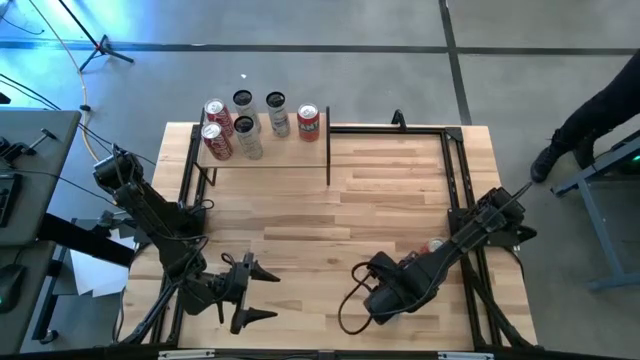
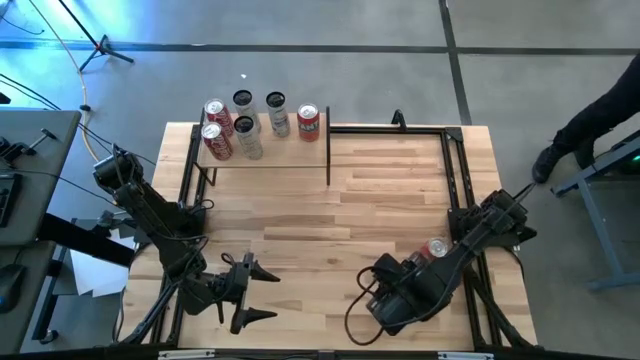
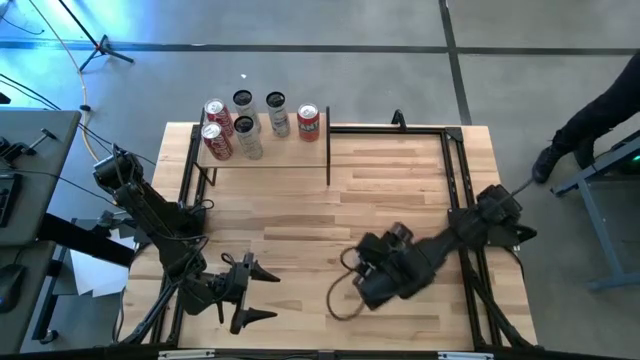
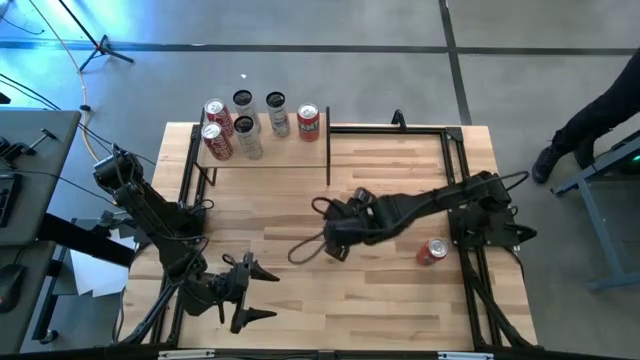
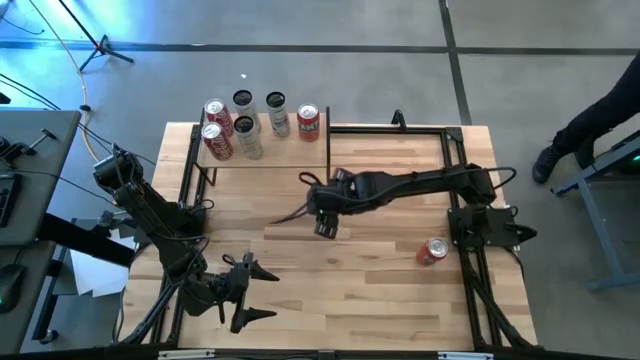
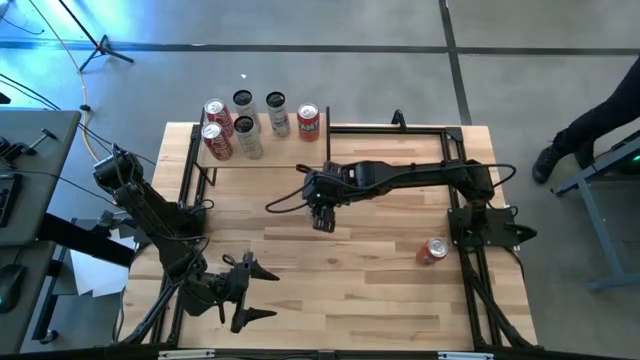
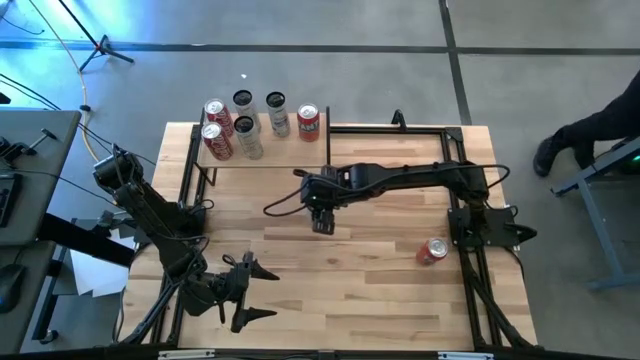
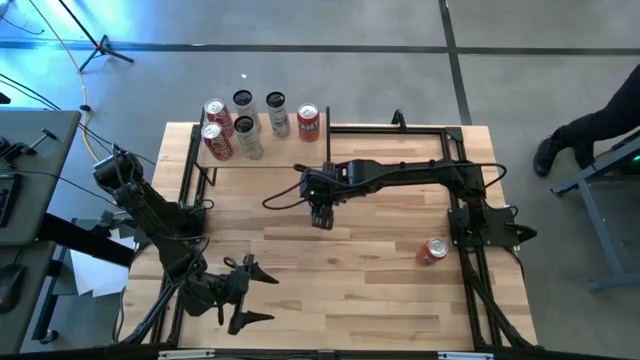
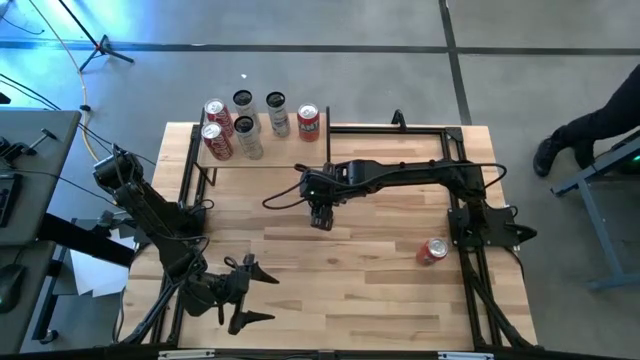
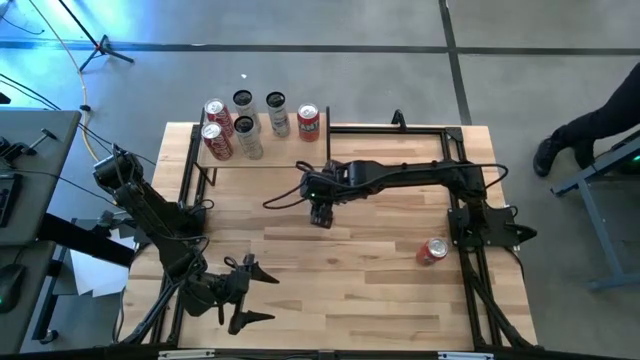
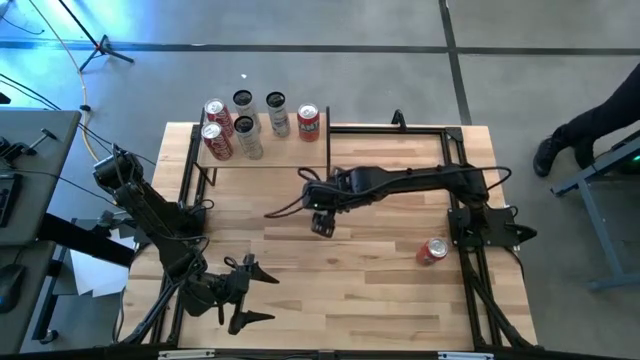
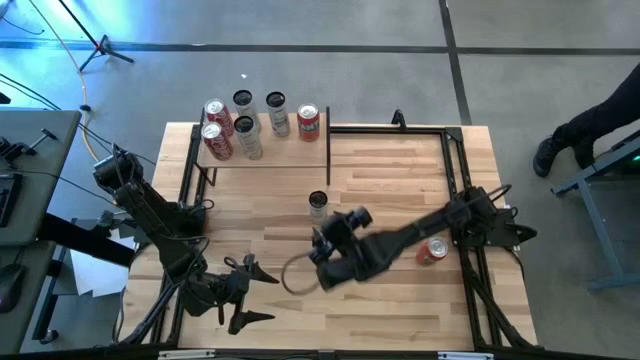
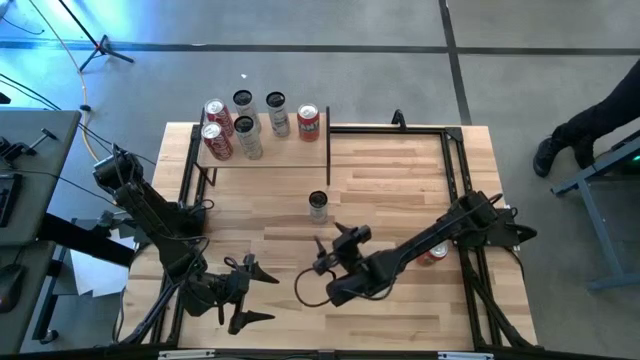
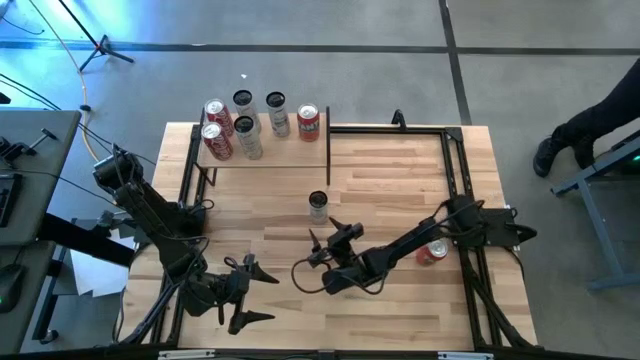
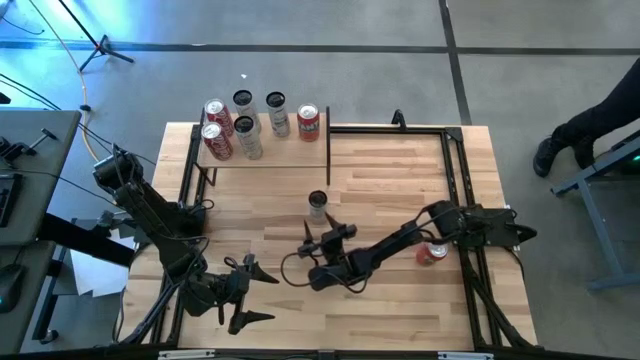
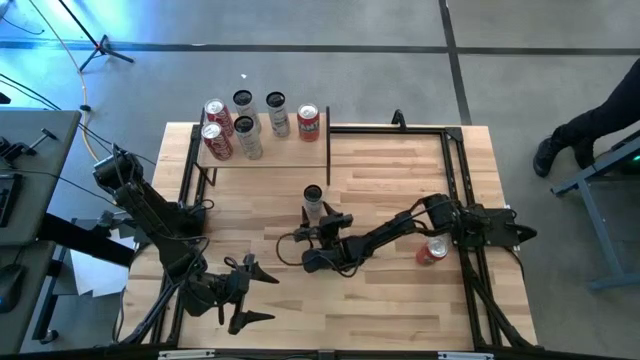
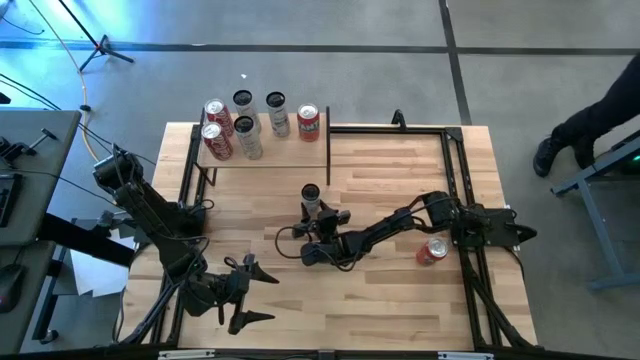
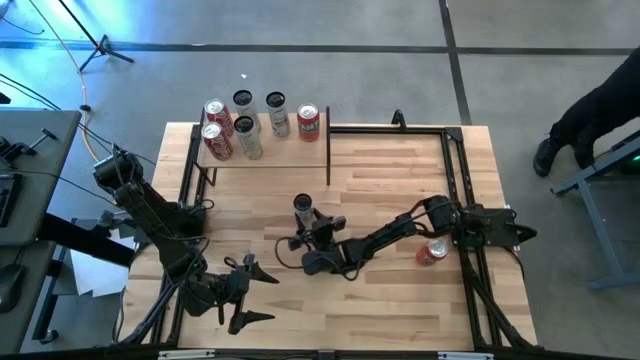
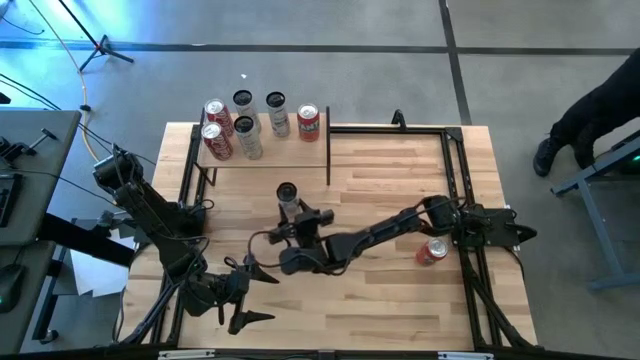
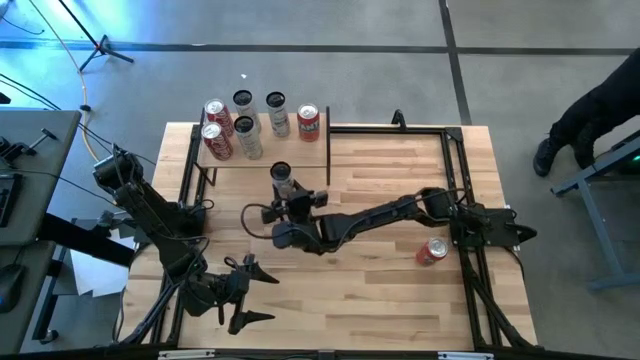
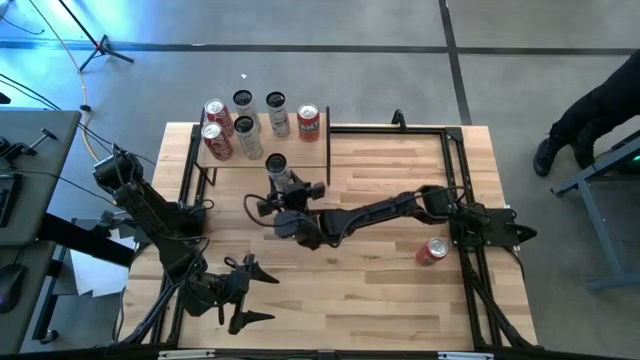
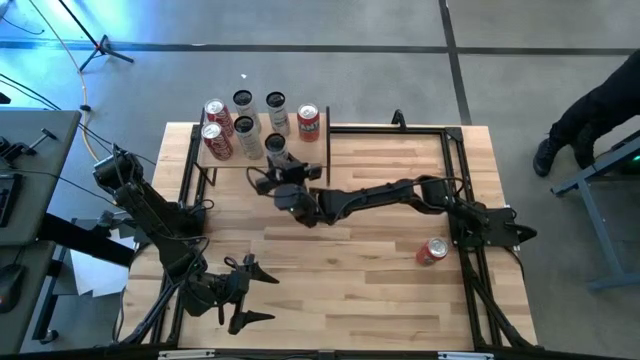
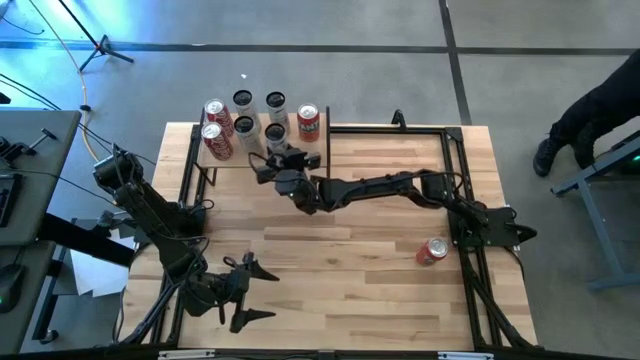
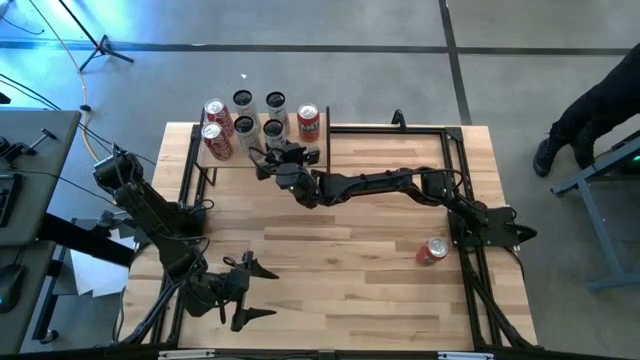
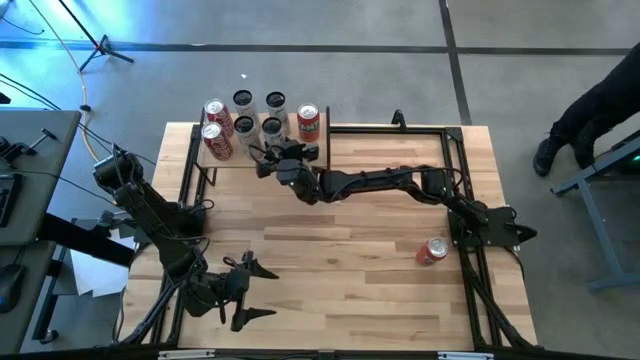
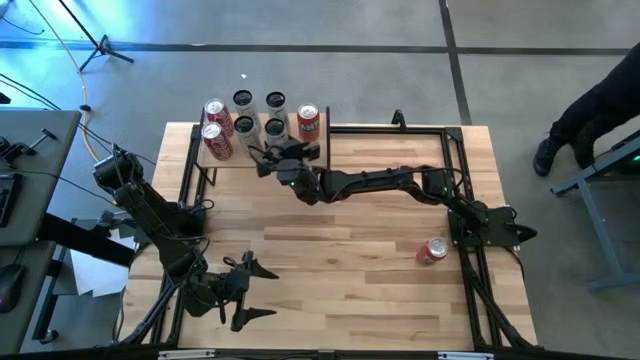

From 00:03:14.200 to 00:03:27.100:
Task: Place canned beverage on shelf
Put the blue soda can on the shelf aligned with the other blue soda can

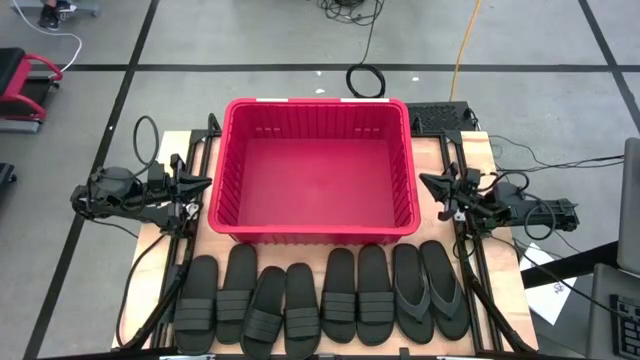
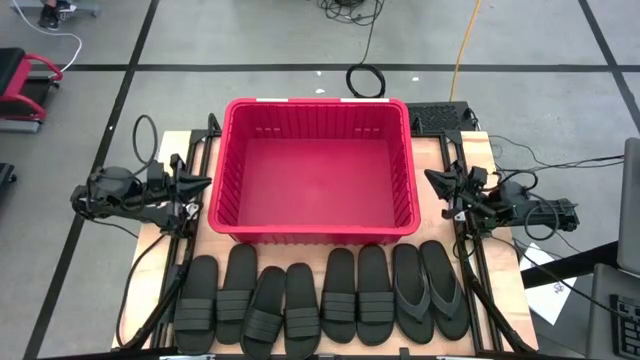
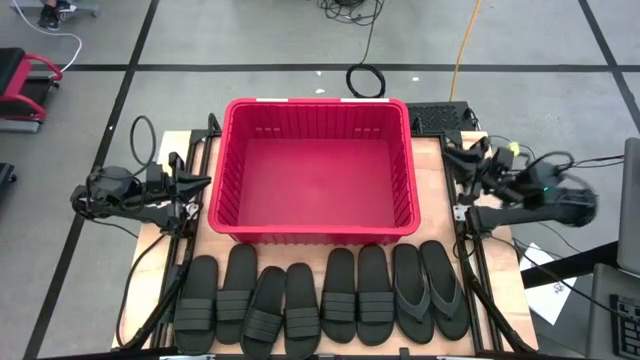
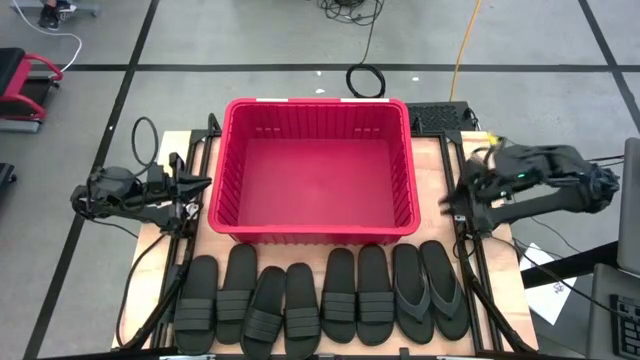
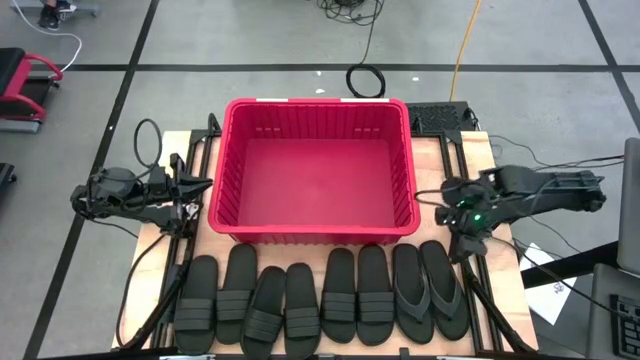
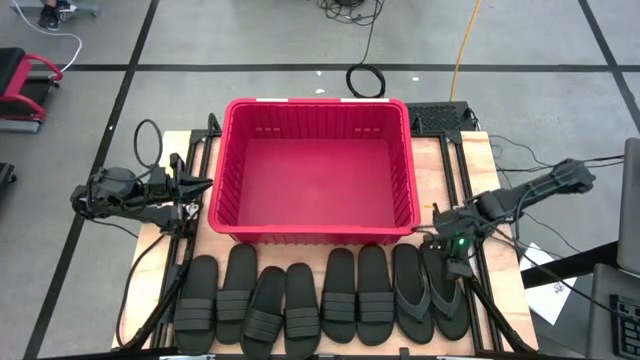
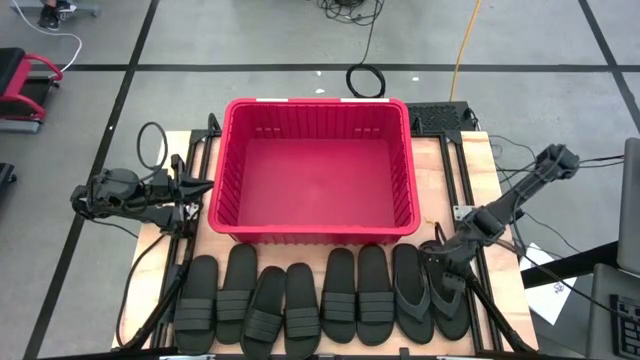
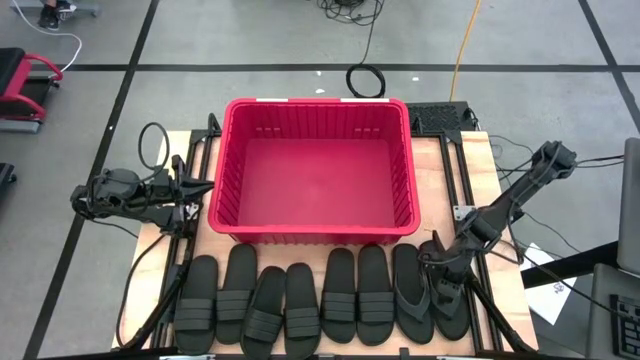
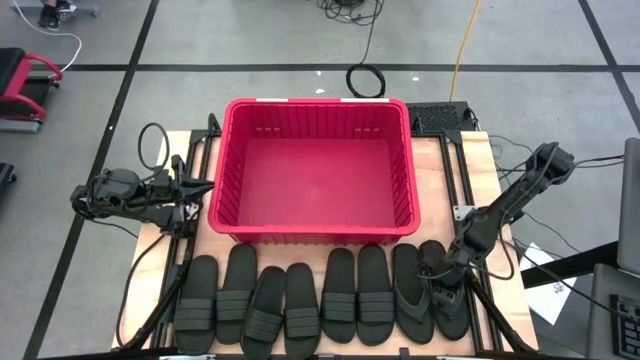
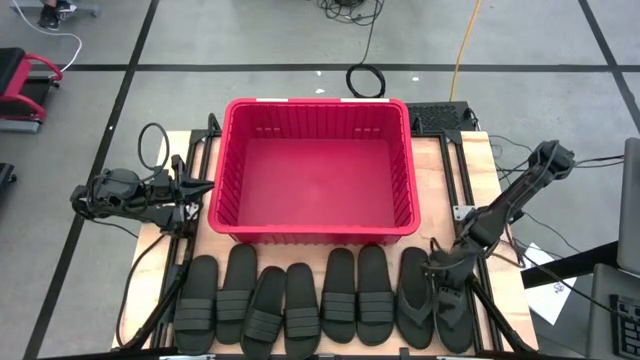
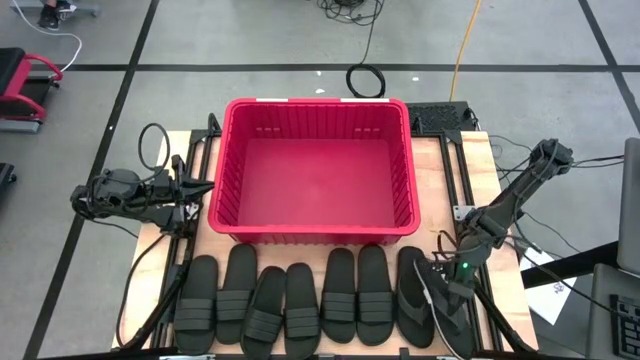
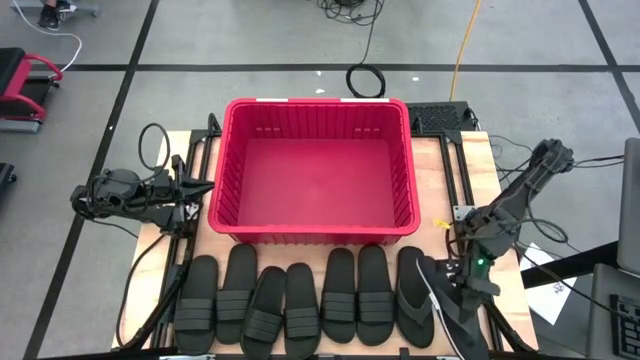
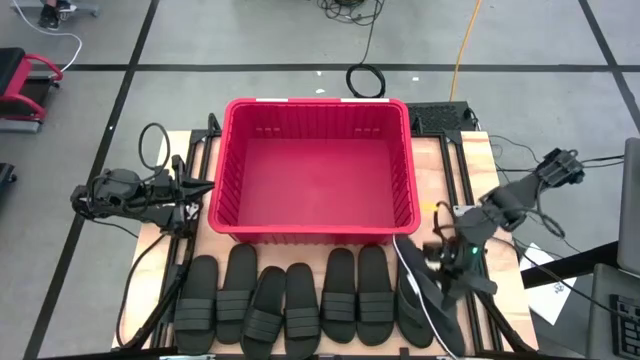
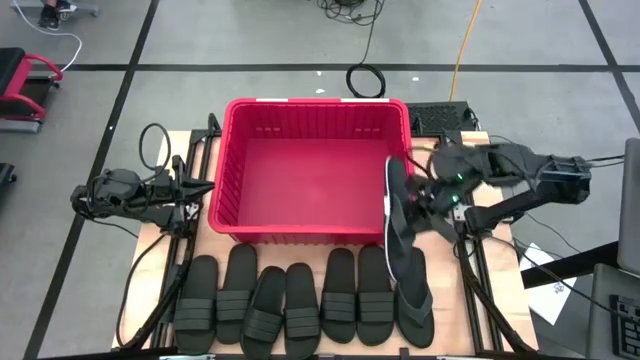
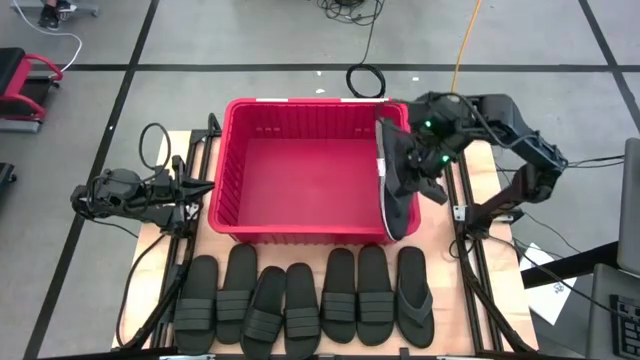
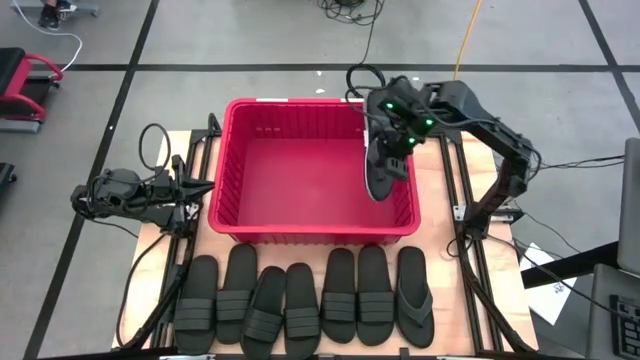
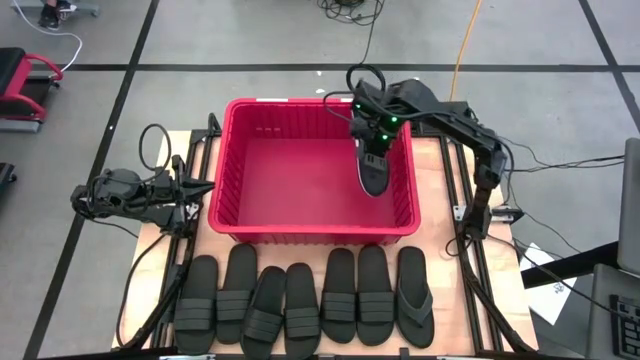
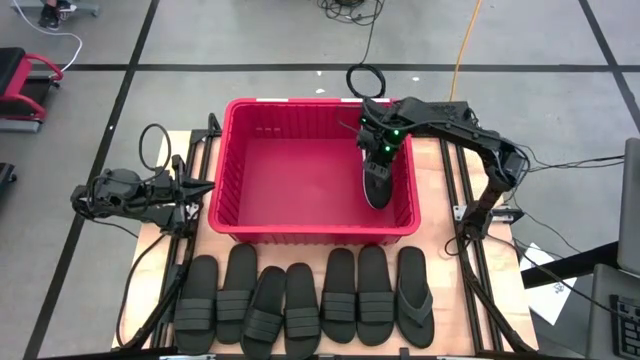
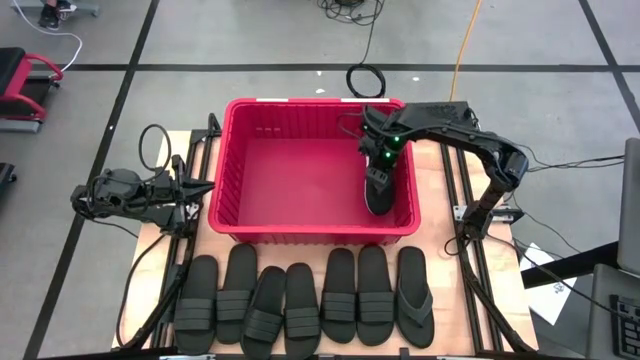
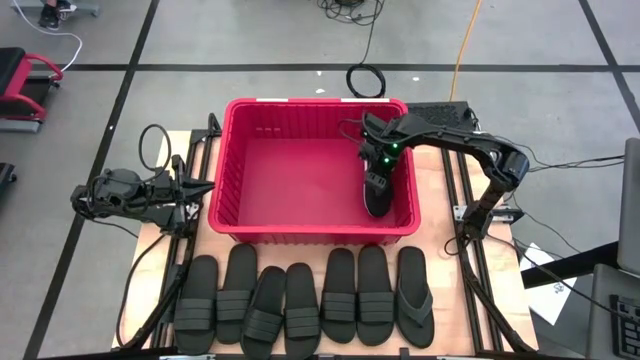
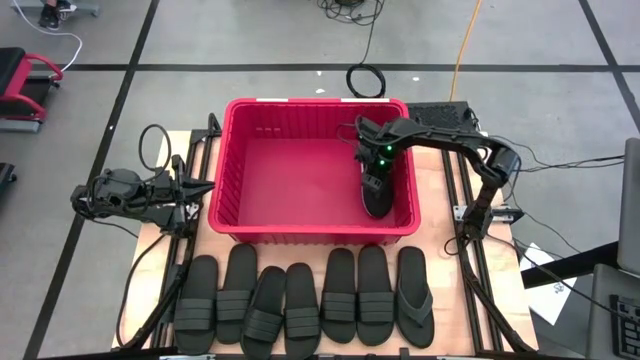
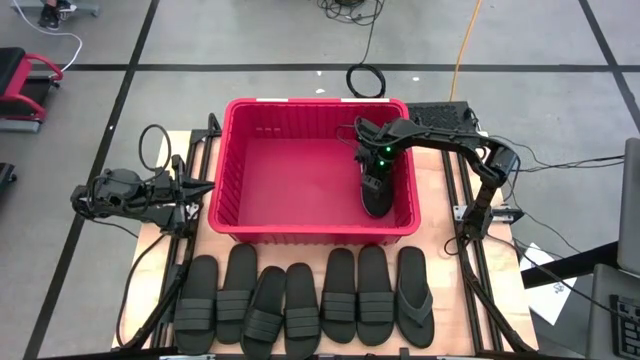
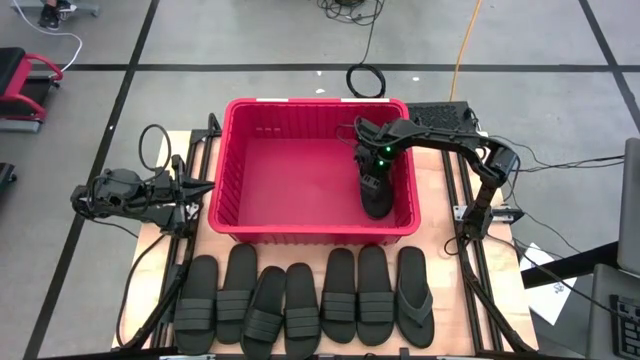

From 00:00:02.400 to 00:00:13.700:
Task: Pick and place slides into bin
Put the flip flop into the red bin
